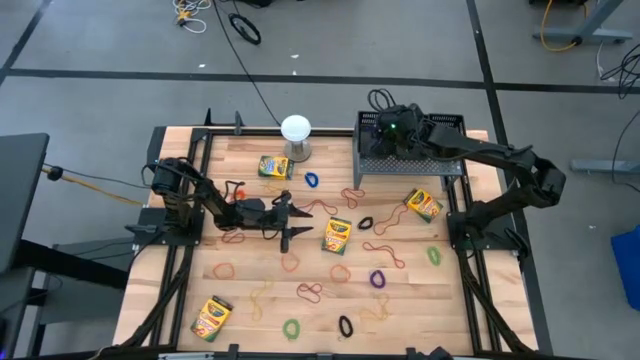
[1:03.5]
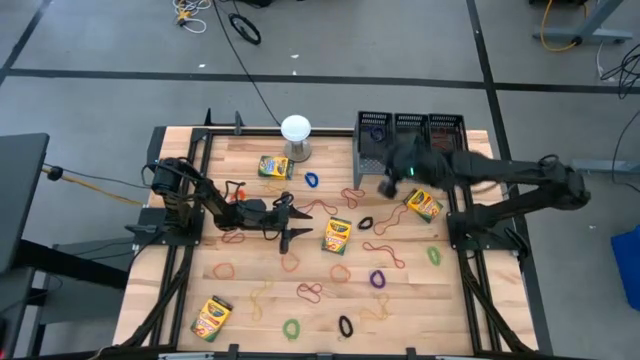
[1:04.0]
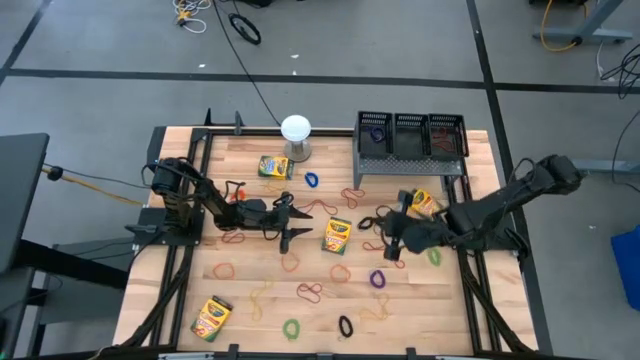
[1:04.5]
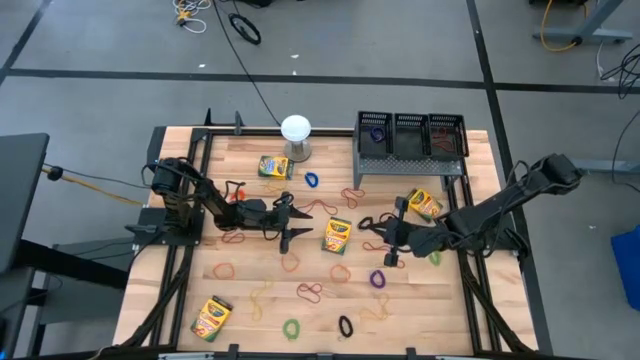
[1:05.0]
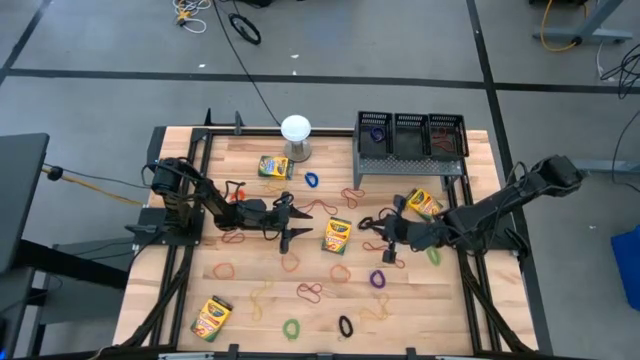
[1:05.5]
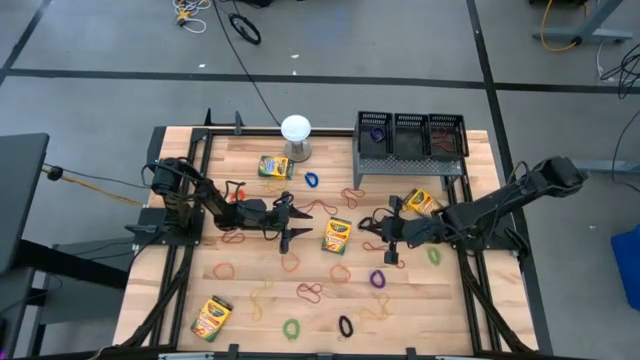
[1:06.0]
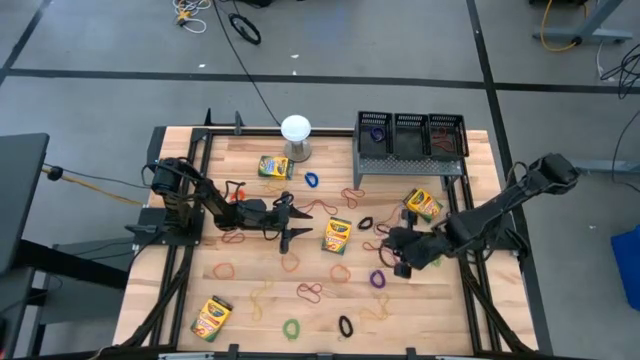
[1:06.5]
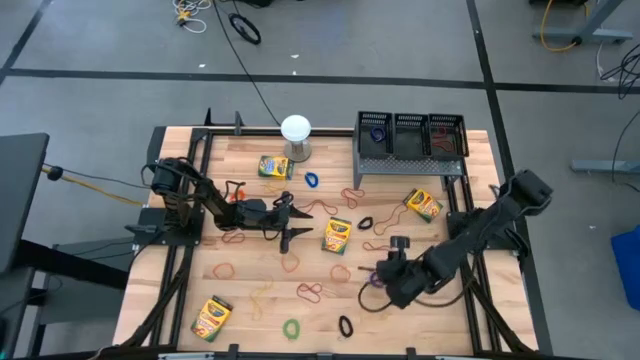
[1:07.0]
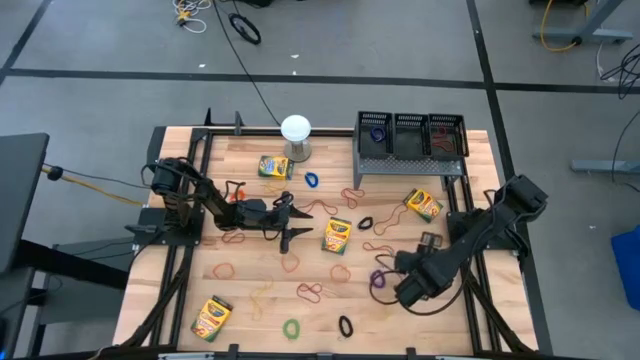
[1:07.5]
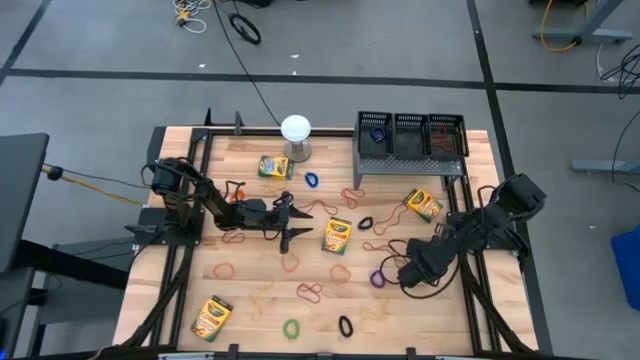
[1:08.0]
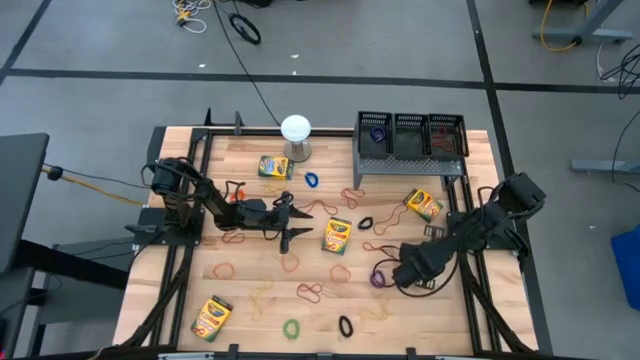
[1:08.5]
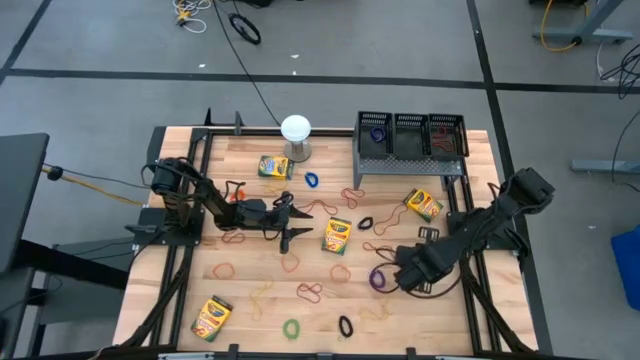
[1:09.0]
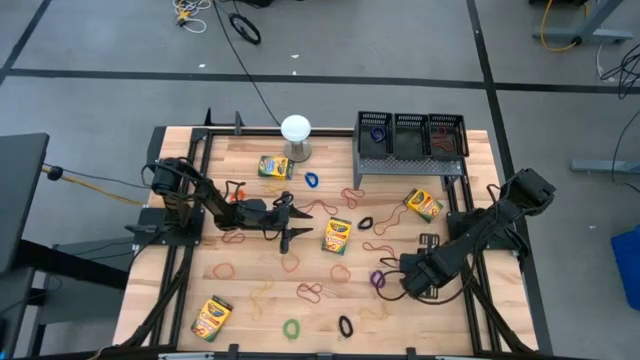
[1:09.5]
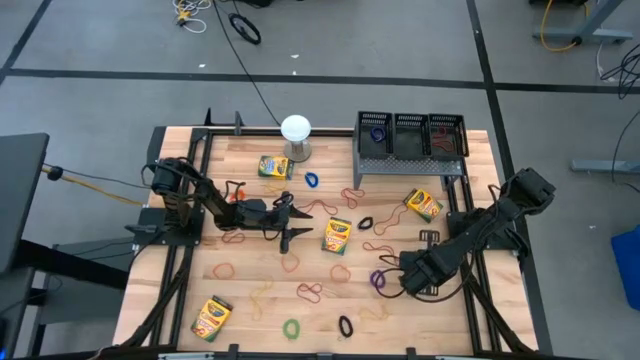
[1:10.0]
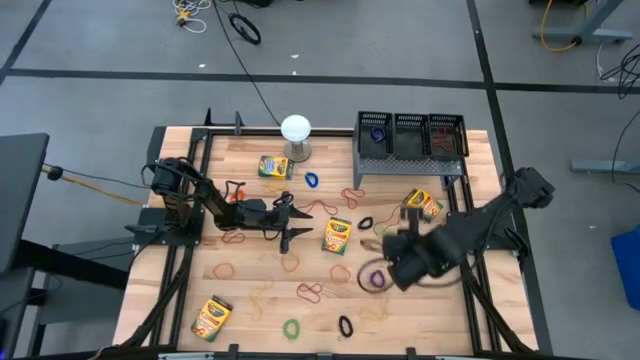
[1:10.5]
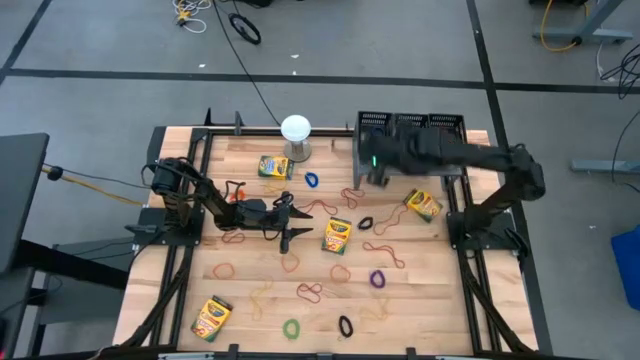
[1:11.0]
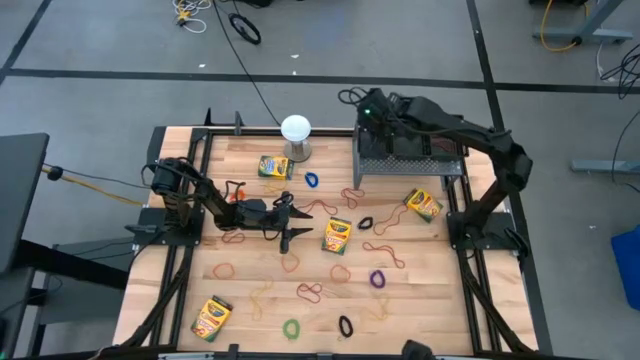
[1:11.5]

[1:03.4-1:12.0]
Task: Pick & Place Office Desk Supplies
Put the green spring keychain into the left black basket on the shelf

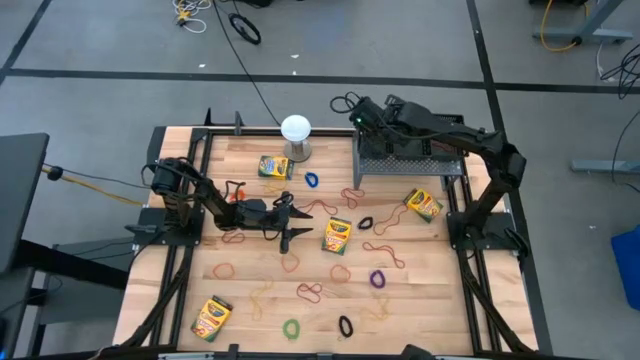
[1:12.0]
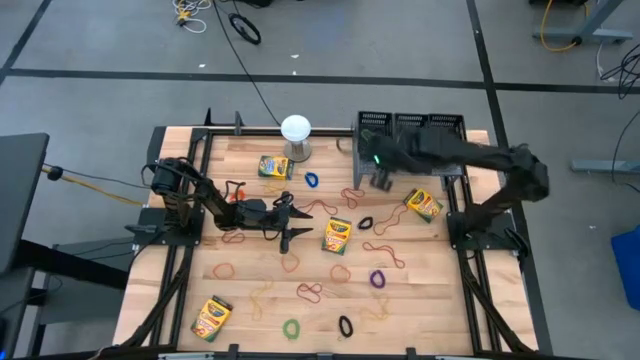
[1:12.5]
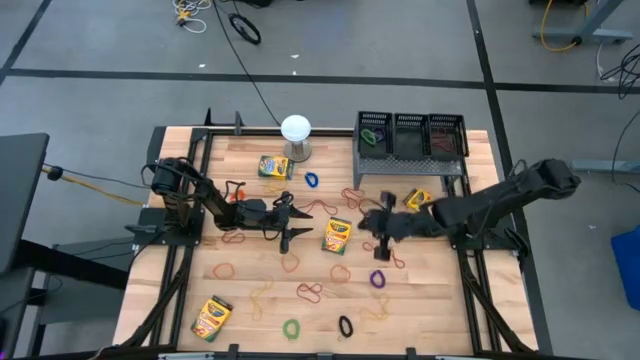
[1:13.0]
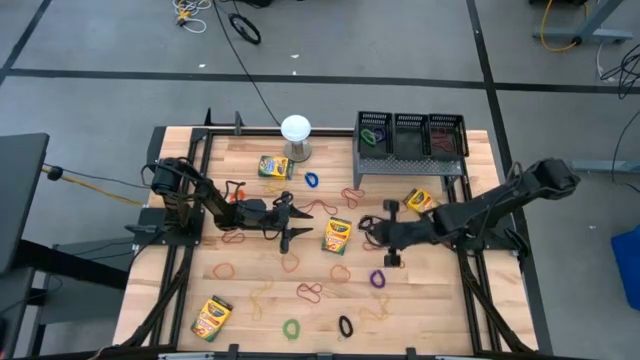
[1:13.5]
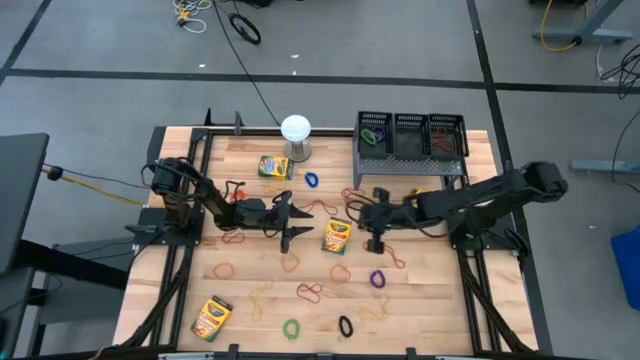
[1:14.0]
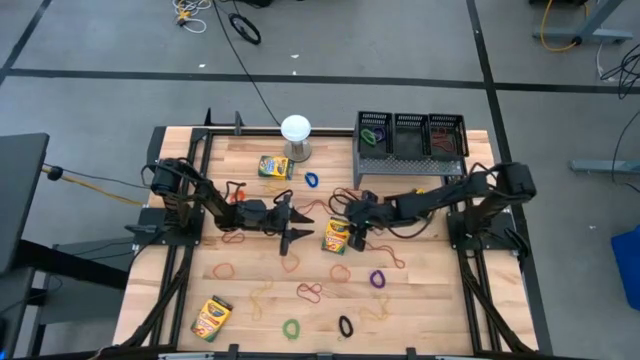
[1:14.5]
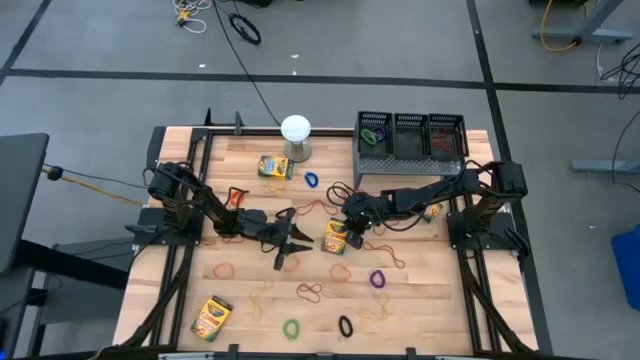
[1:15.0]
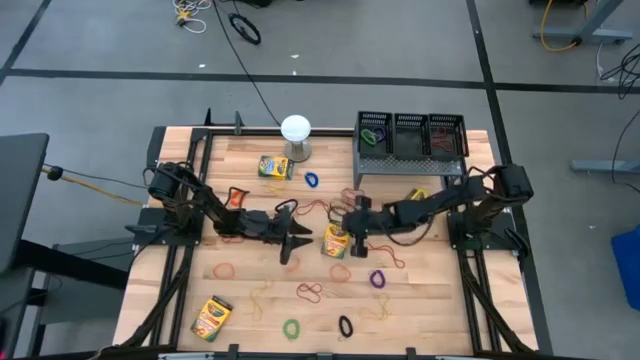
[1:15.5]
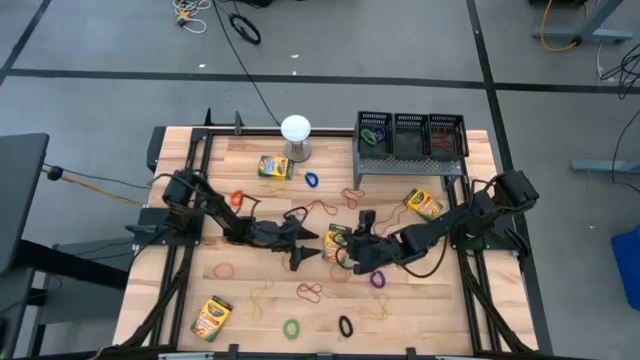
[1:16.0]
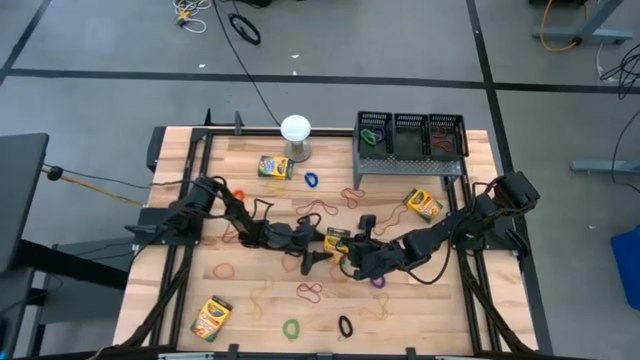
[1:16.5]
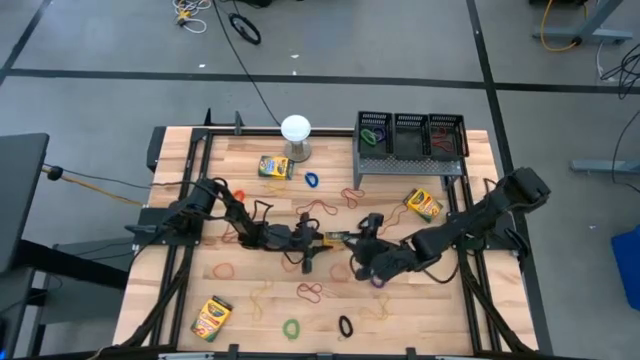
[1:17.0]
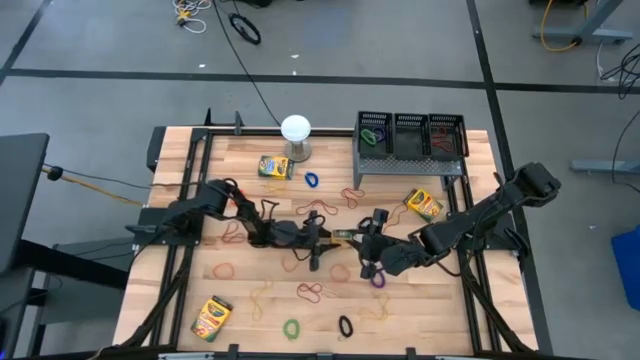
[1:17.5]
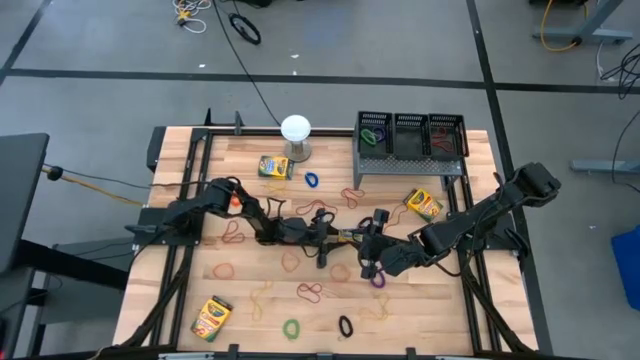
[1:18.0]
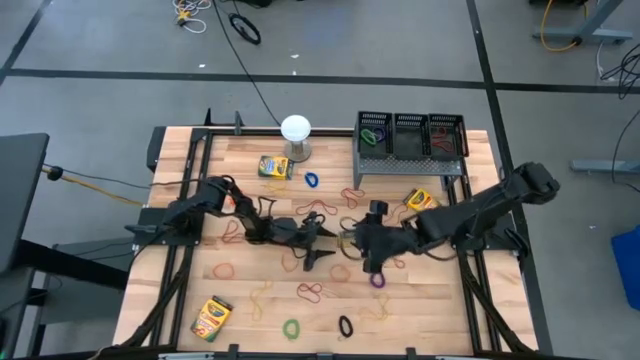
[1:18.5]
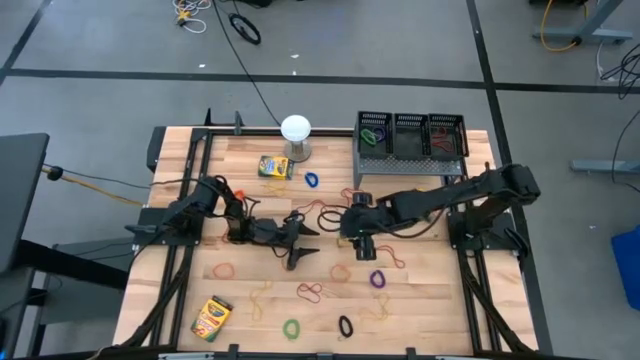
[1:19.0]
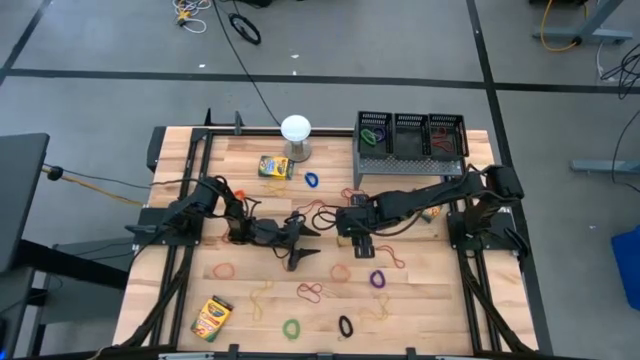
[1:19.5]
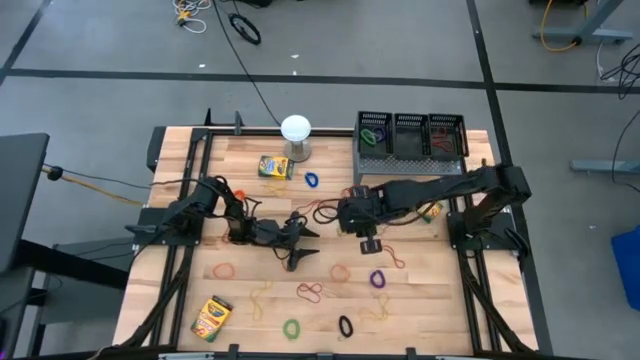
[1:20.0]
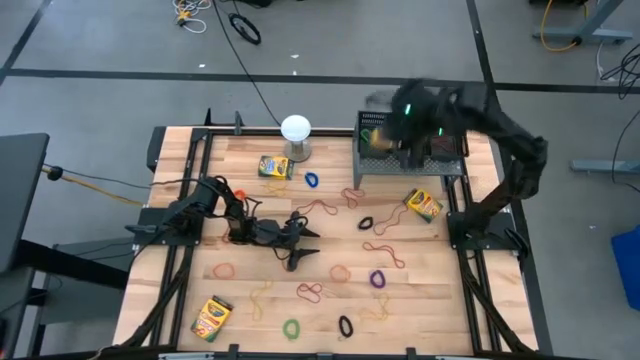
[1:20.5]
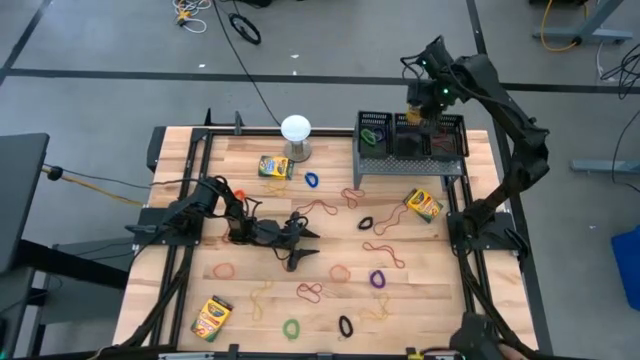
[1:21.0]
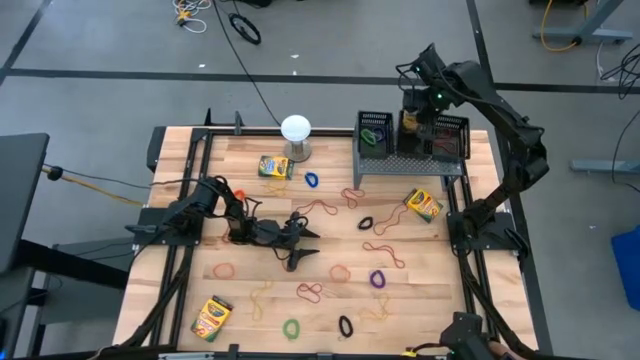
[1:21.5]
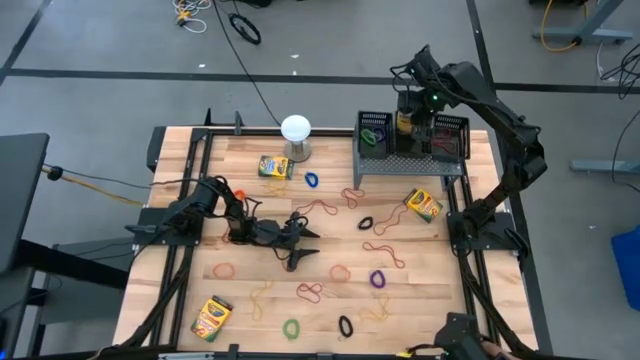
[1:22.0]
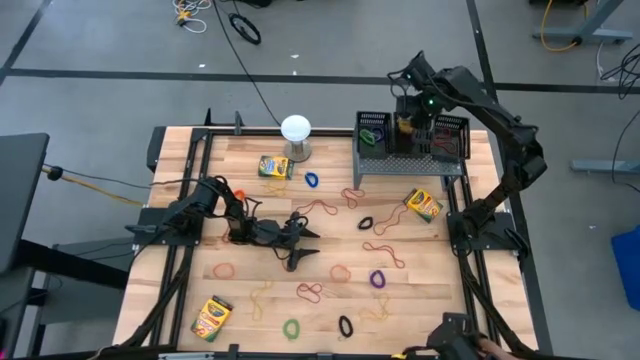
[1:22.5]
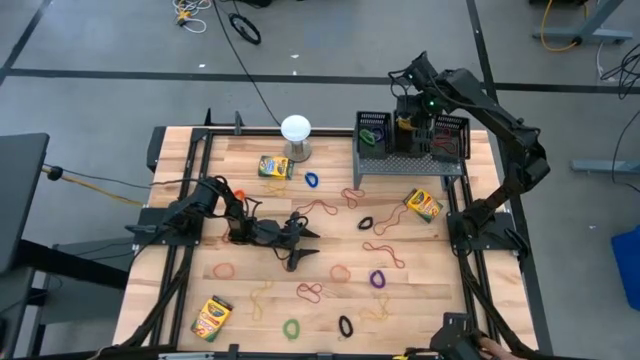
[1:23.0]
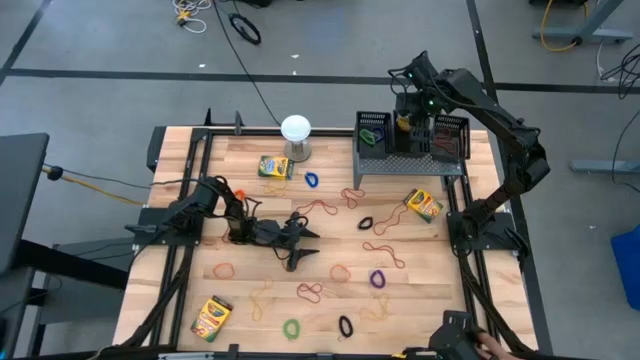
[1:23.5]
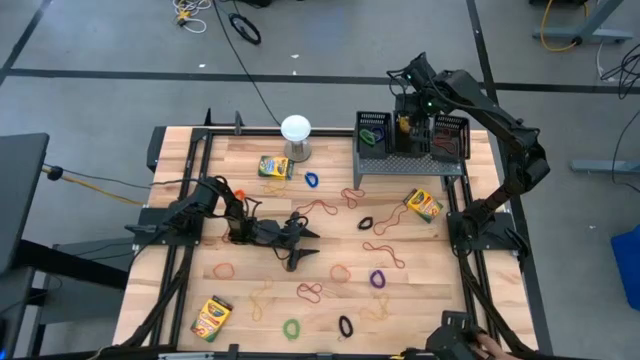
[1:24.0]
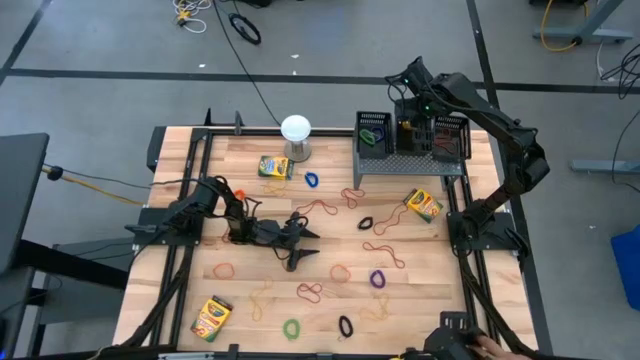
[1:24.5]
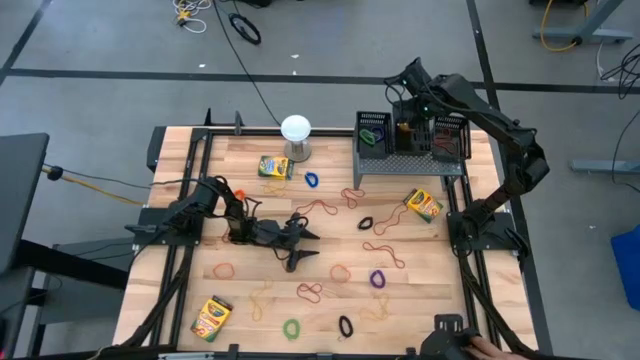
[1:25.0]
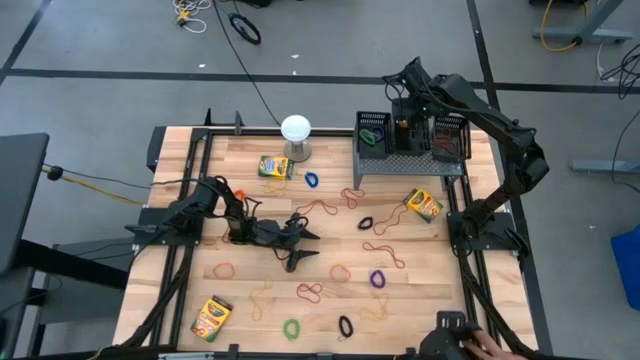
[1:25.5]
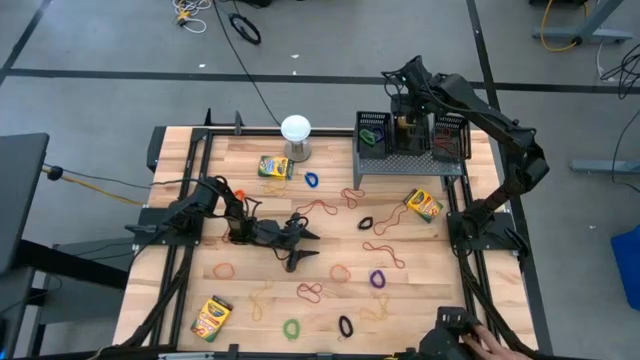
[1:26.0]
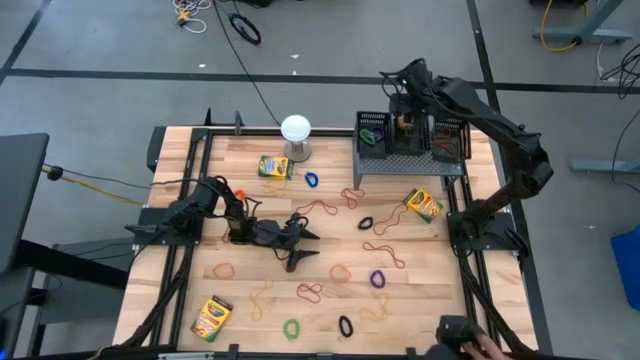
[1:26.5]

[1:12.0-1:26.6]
Put the yellow crayon box into the middle black basket on the shelf
